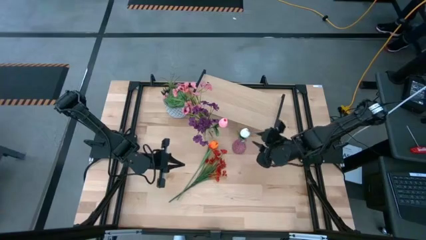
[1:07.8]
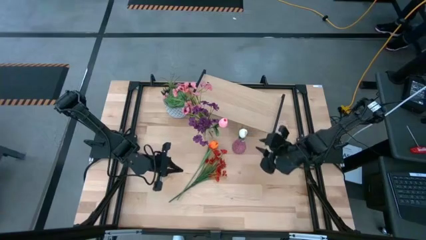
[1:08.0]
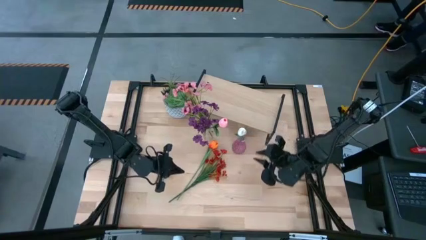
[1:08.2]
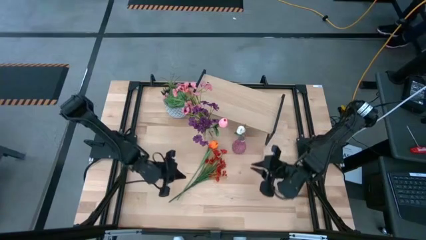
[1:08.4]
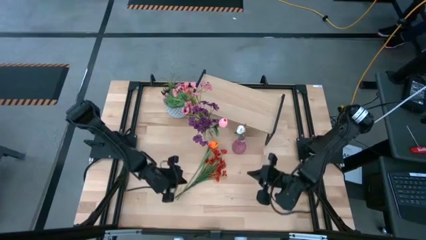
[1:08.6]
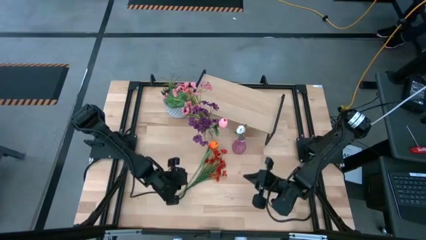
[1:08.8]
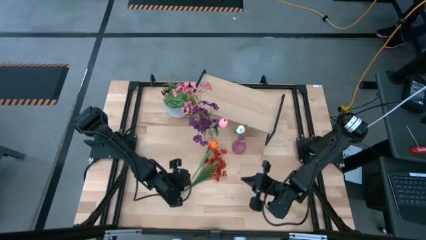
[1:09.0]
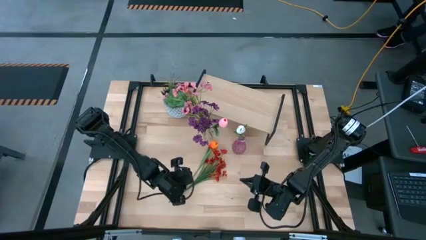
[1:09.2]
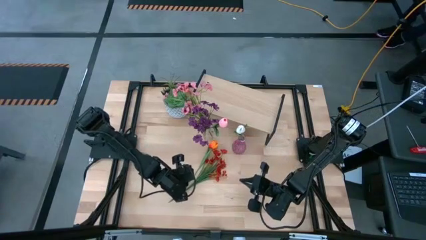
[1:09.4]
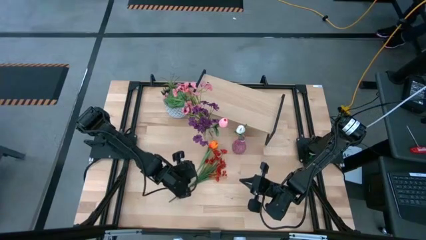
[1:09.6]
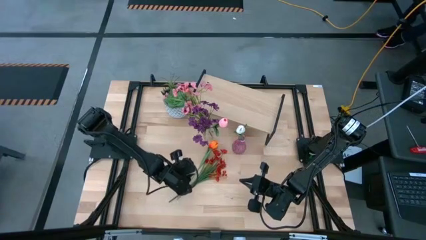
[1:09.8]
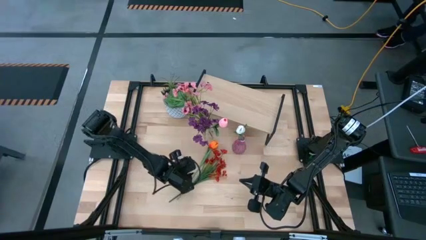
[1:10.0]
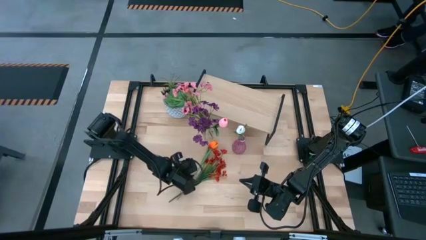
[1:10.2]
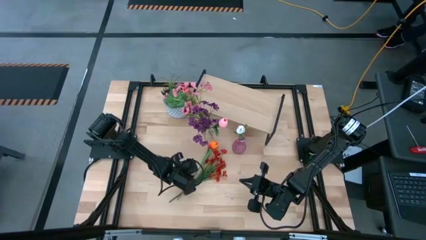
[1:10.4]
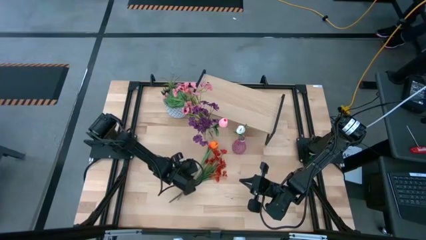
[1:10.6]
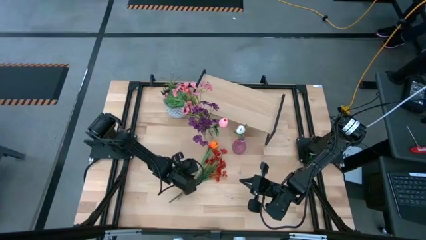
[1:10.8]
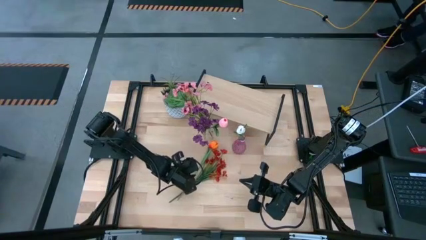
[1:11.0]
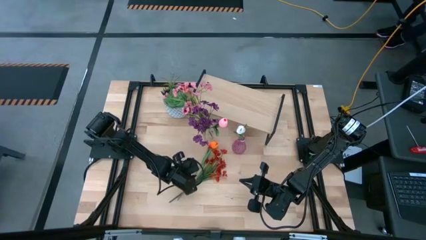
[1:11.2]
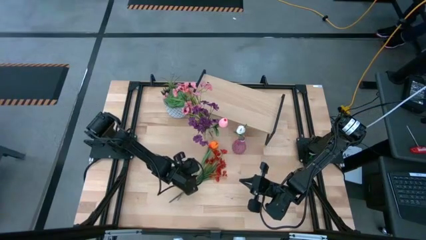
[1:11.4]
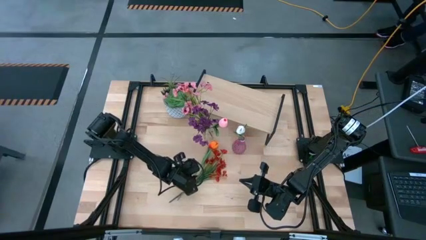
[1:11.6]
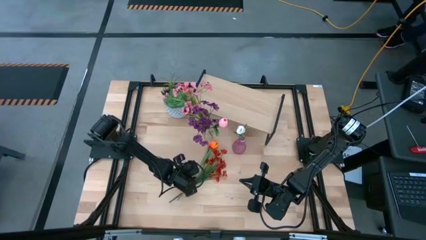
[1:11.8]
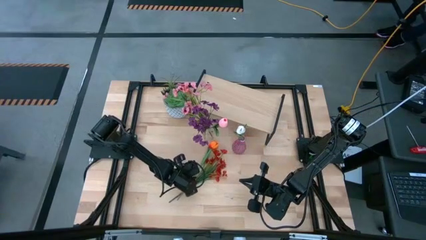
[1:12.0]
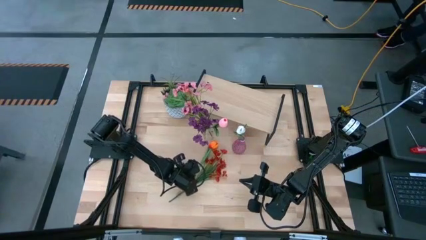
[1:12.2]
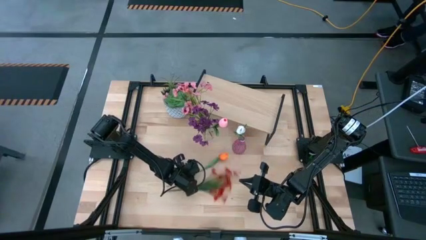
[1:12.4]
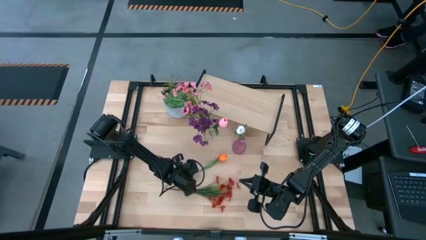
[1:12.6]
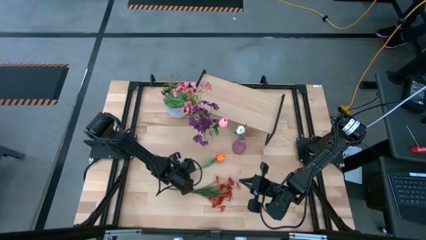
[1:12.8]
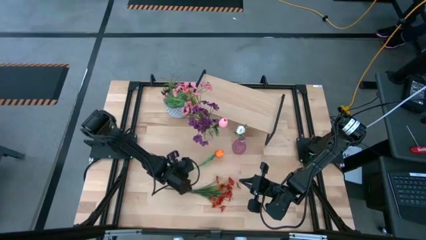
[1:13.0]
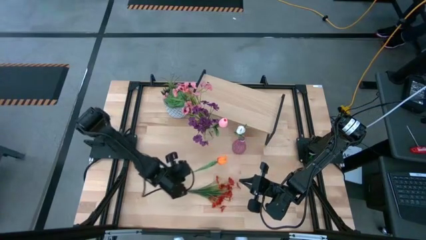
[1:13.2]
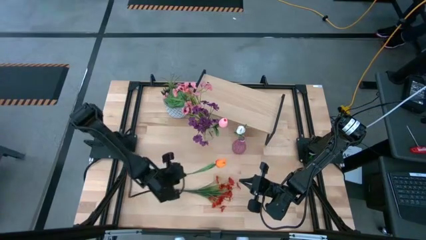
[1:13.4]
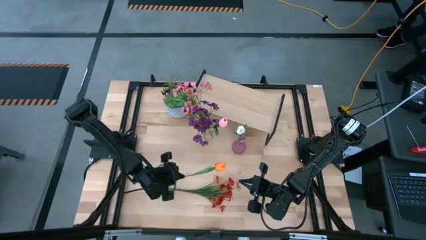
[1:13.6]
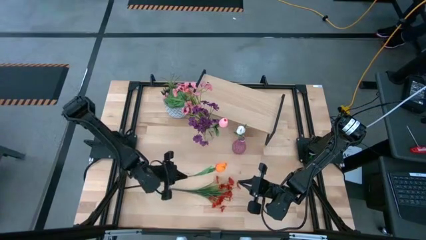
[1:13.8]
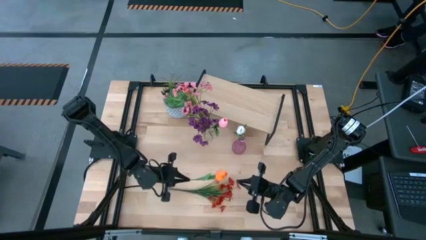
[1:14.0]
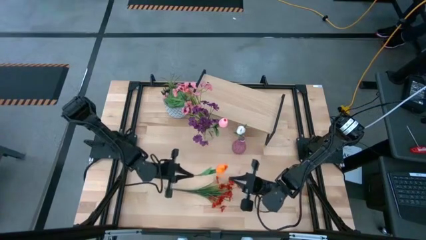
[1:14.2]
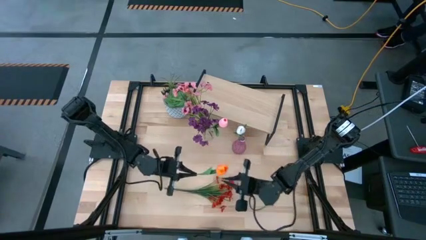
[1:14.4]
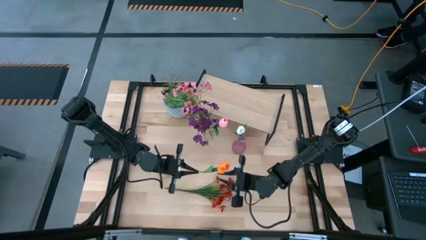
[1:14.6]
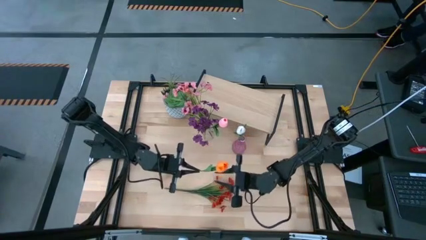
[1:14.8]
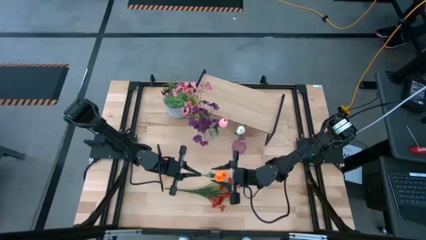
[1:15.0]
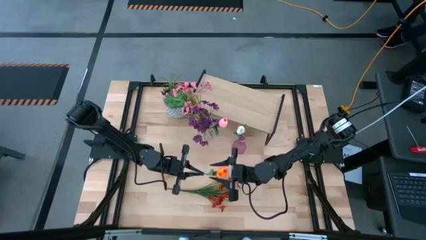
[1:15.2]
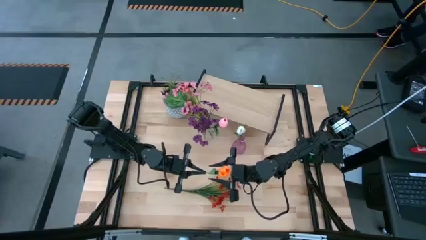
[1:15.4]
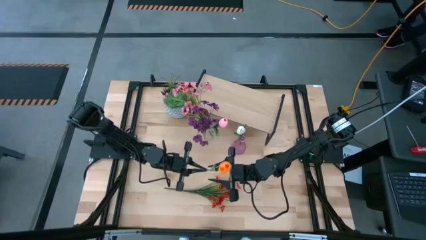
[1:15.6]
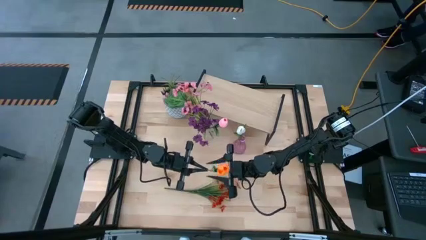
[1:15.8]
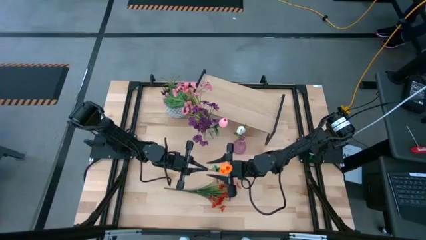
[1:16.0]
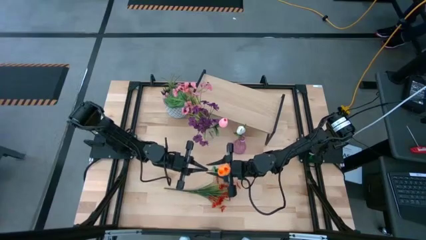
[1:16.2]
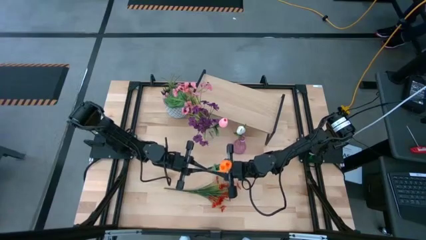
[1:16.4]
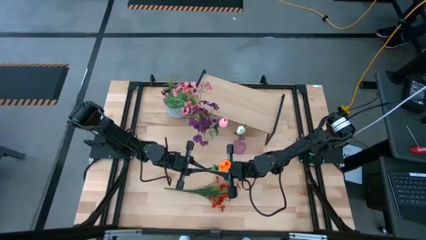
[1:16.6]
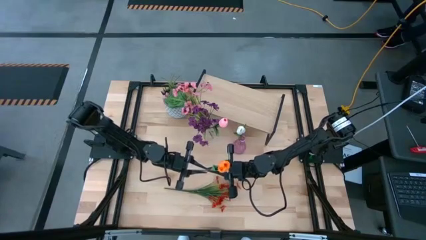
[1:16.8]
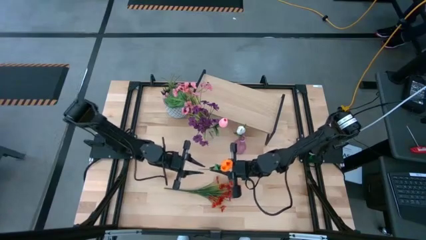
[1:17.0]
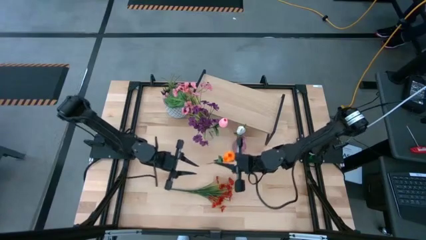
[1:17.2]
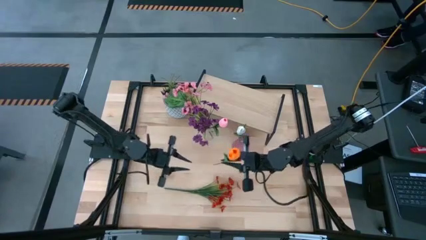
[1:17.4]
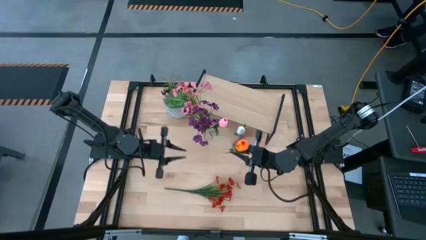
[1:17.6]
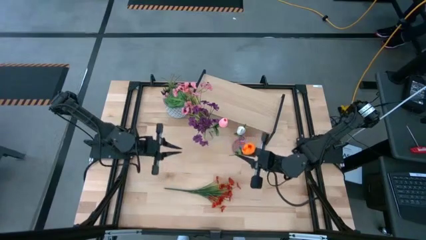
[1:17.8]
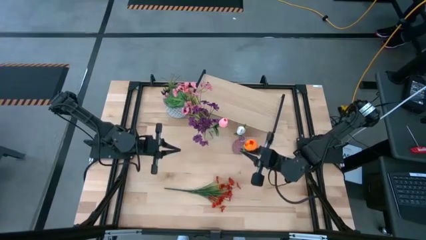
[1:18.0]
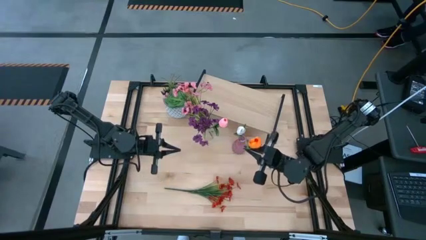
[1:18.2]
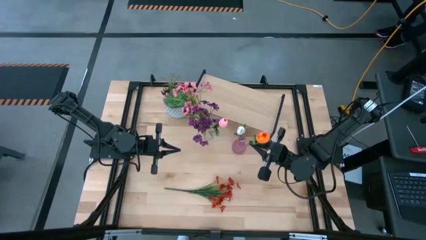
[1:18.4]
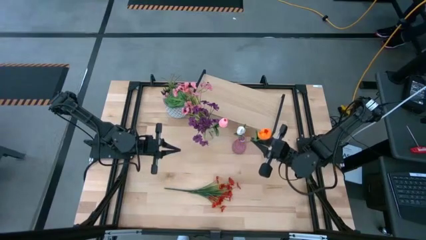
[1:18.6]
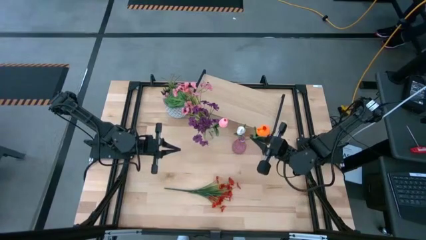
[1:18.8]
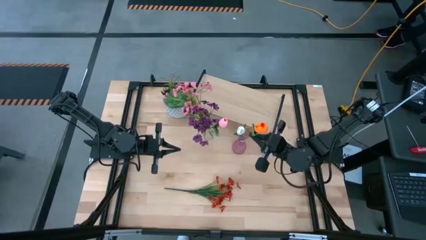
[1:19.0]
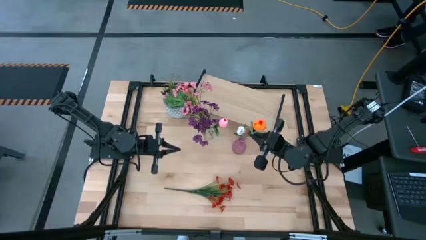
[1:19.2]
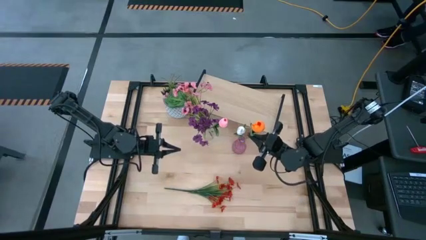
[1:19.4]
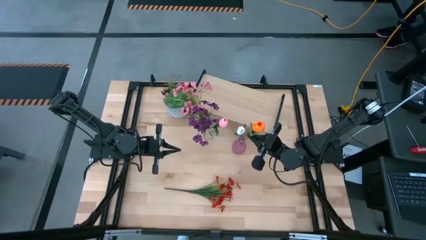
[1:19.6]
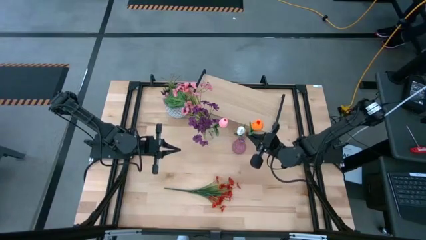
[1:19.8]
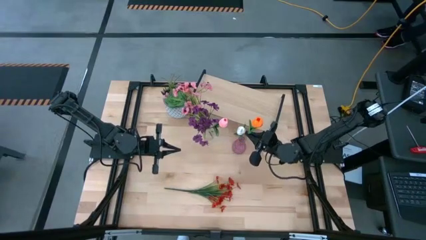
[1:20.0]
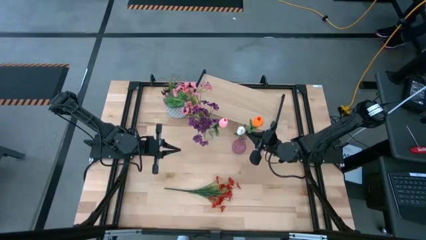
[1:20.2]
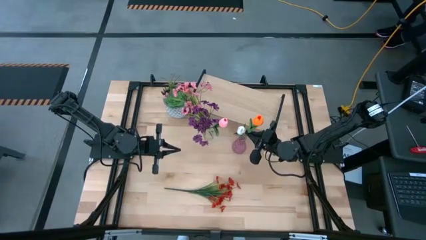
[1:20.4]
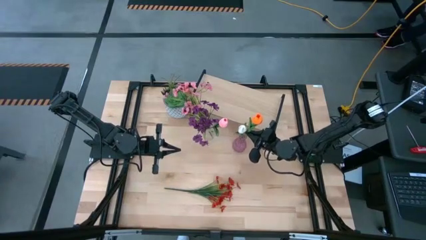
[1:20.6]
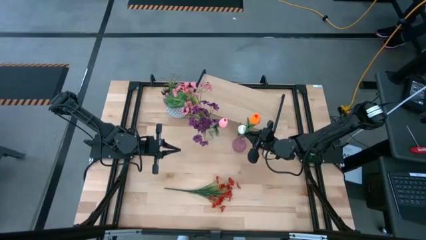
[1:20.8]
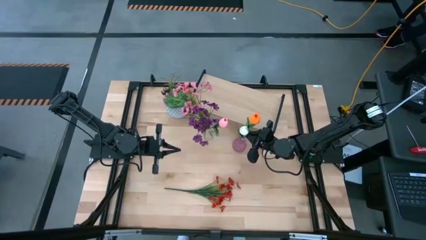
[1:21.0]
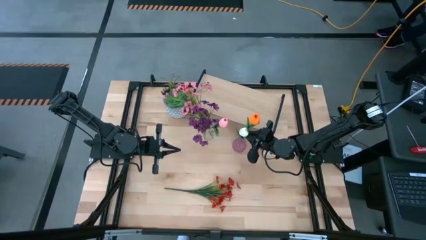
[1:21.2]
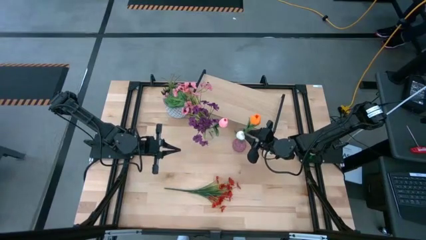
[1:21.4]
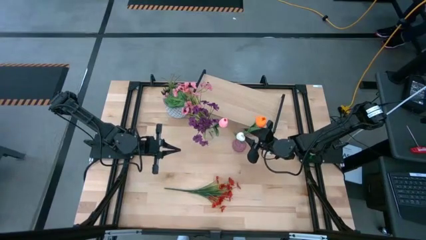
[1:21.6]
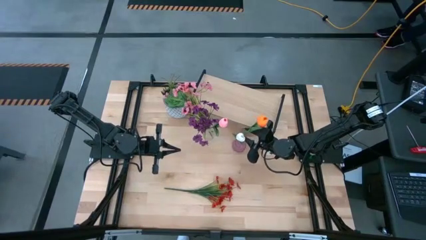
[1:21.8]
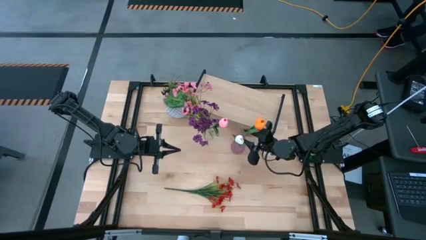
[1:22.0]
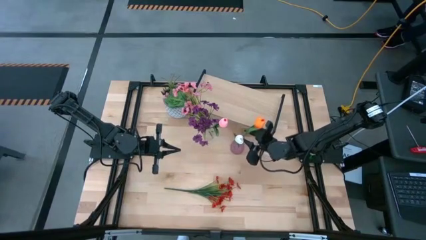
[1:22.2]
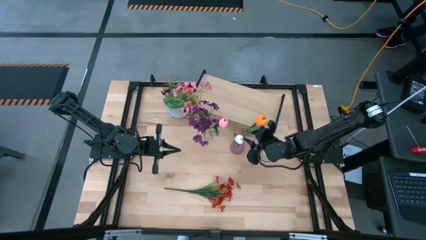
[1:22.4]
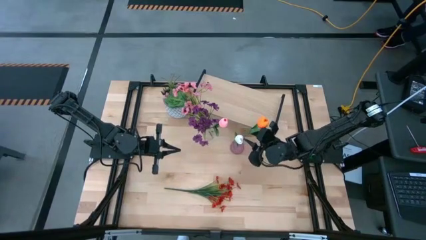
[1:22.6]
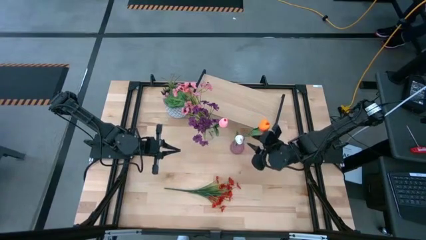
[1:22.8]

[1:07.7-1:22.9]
Task: Pick and place flowers into a vace then onto a shelf
Put the orange tulip into the purple vase
